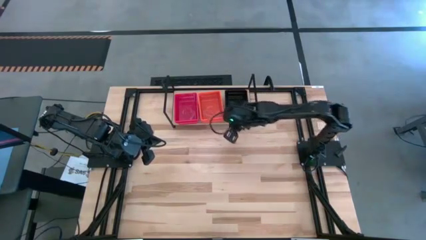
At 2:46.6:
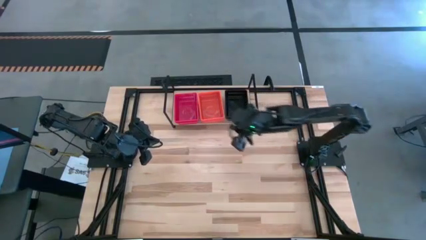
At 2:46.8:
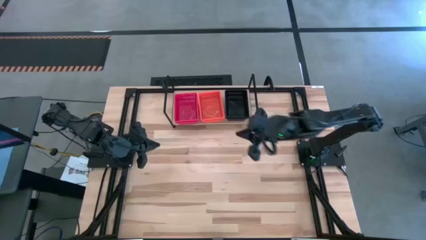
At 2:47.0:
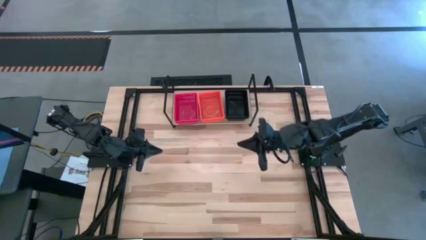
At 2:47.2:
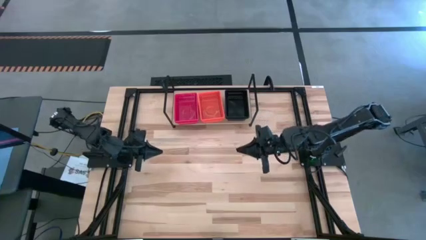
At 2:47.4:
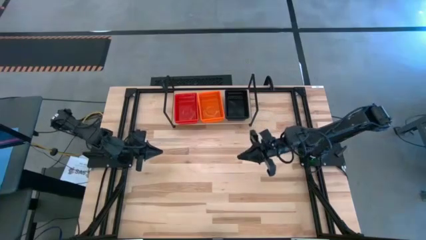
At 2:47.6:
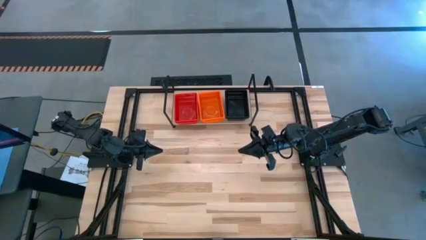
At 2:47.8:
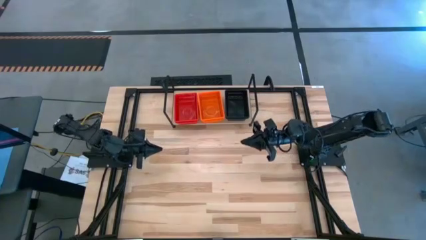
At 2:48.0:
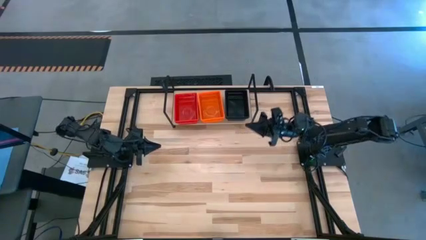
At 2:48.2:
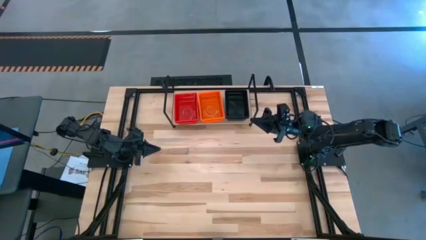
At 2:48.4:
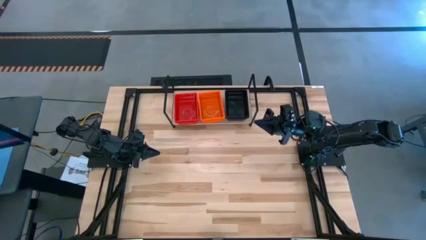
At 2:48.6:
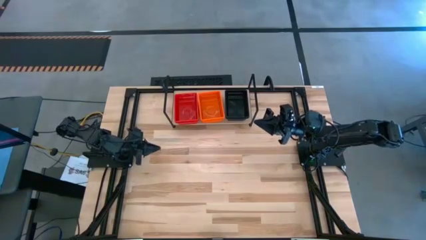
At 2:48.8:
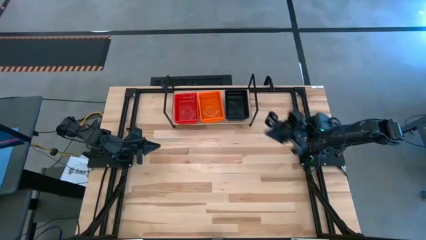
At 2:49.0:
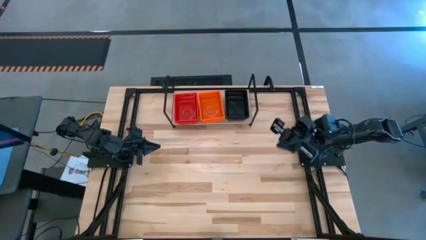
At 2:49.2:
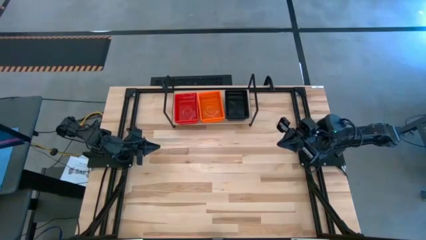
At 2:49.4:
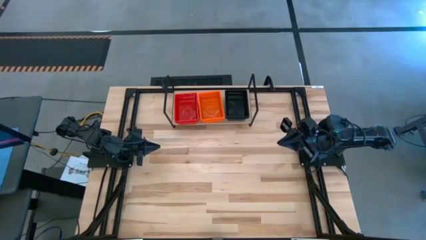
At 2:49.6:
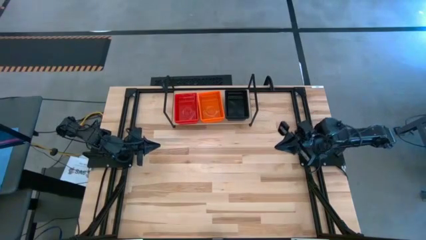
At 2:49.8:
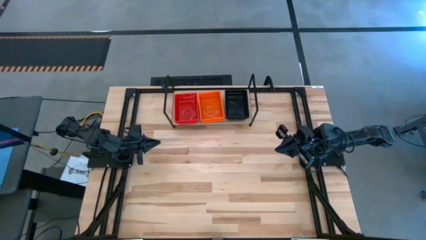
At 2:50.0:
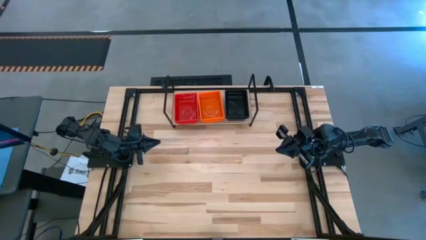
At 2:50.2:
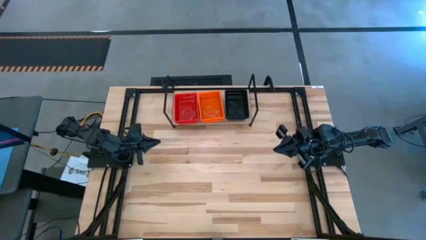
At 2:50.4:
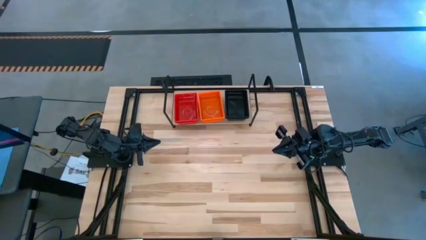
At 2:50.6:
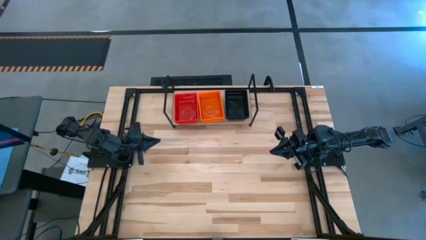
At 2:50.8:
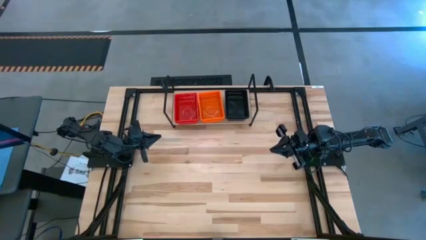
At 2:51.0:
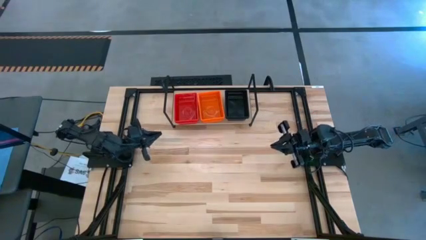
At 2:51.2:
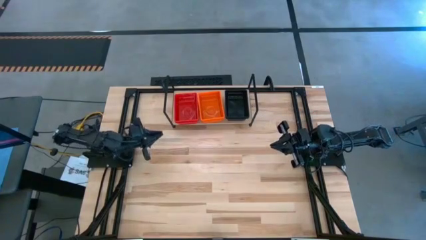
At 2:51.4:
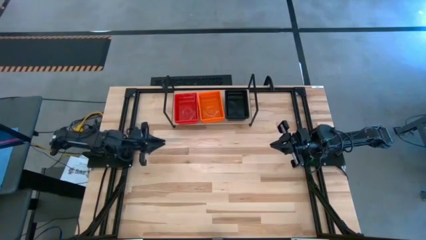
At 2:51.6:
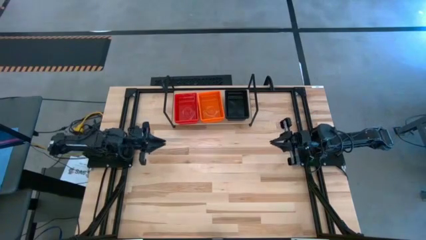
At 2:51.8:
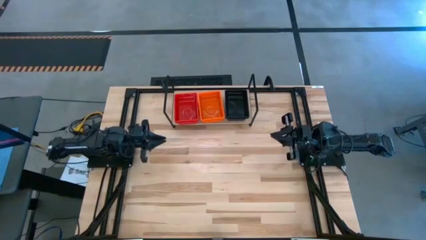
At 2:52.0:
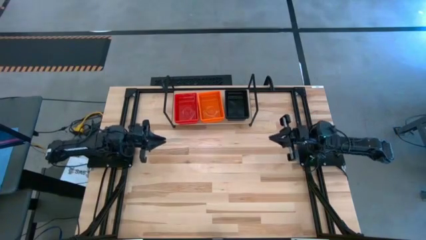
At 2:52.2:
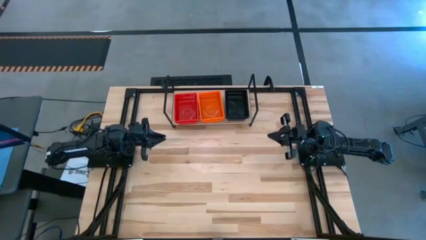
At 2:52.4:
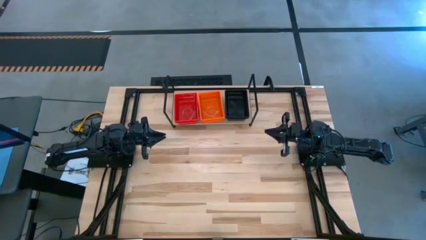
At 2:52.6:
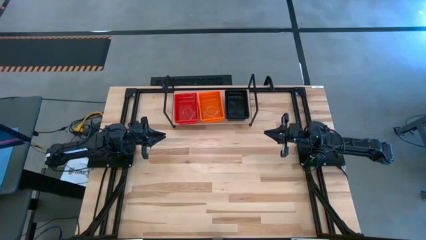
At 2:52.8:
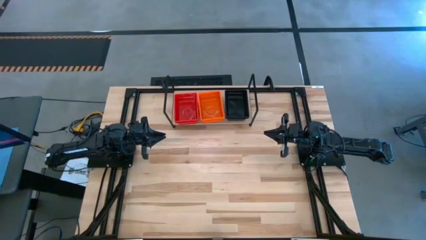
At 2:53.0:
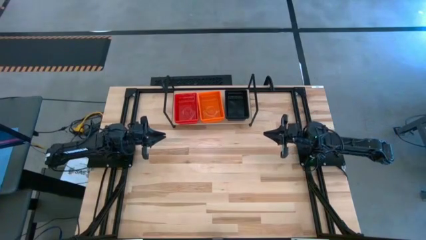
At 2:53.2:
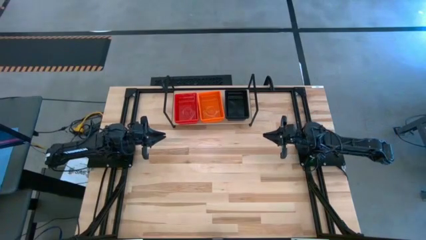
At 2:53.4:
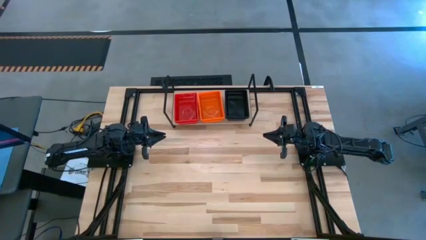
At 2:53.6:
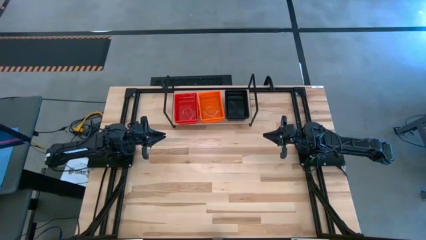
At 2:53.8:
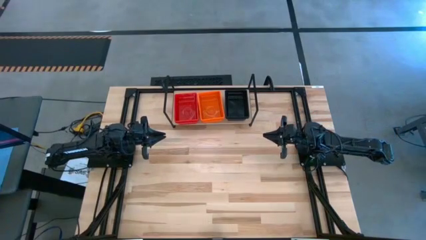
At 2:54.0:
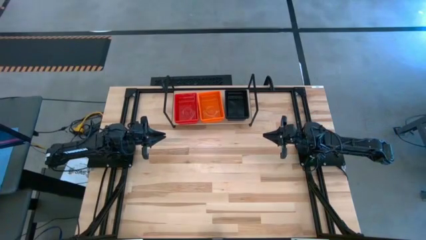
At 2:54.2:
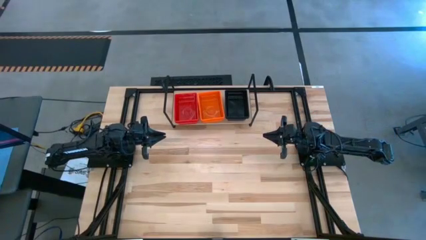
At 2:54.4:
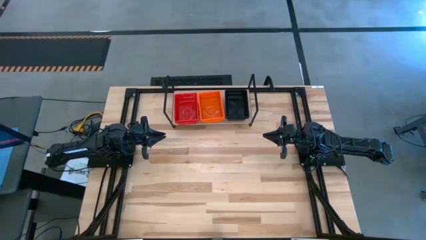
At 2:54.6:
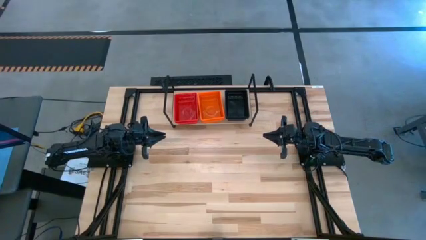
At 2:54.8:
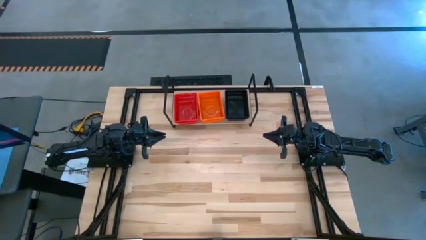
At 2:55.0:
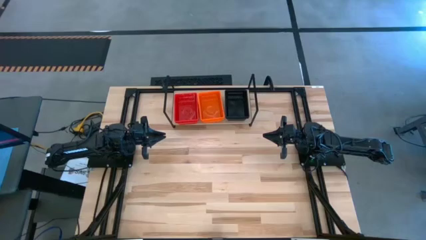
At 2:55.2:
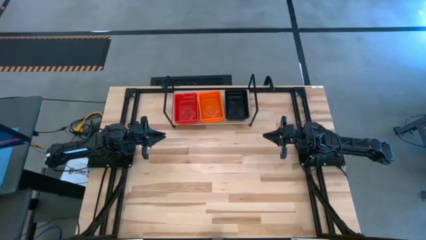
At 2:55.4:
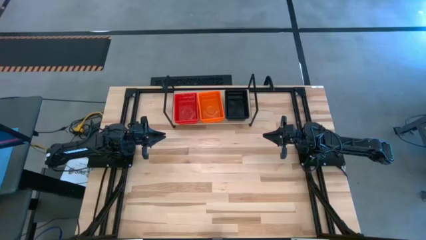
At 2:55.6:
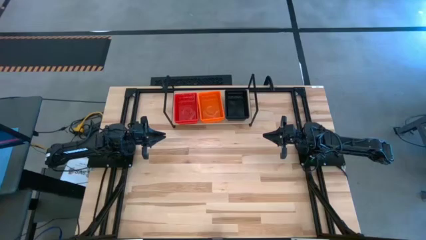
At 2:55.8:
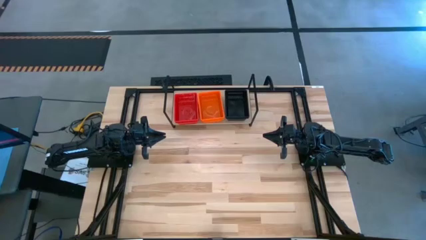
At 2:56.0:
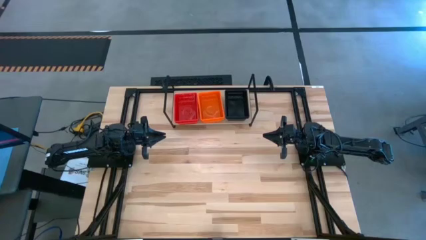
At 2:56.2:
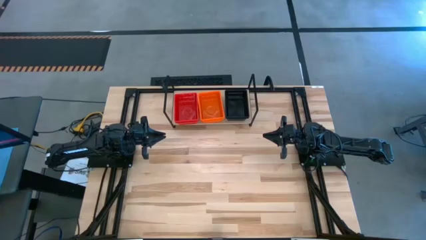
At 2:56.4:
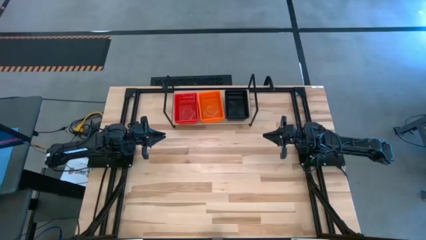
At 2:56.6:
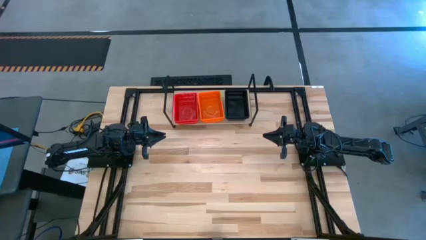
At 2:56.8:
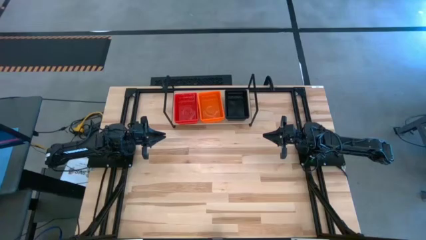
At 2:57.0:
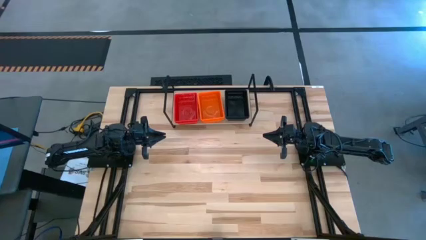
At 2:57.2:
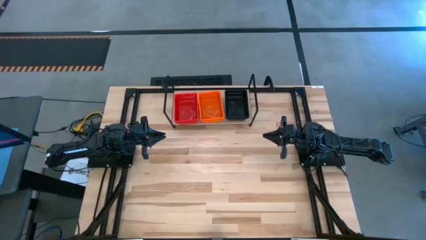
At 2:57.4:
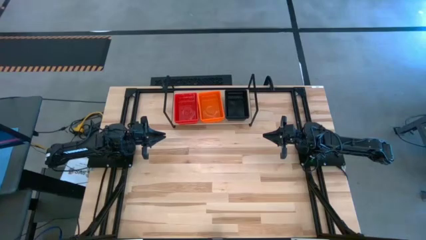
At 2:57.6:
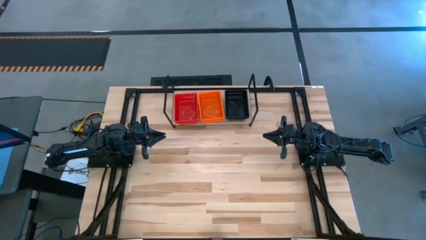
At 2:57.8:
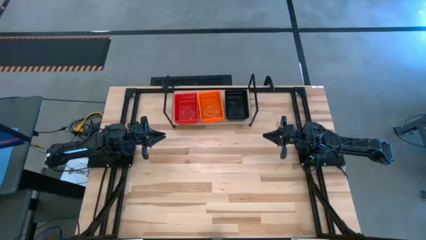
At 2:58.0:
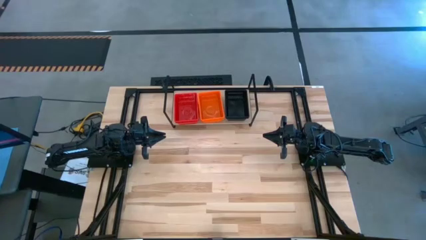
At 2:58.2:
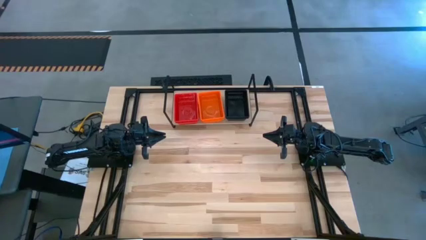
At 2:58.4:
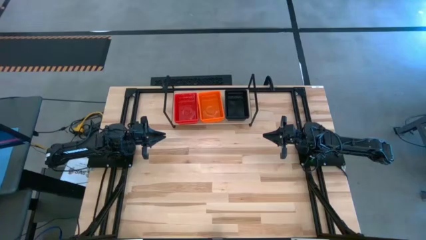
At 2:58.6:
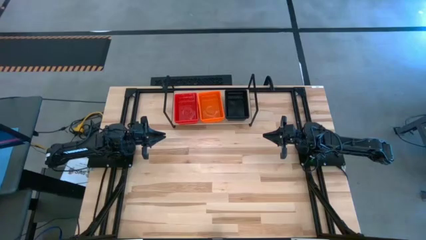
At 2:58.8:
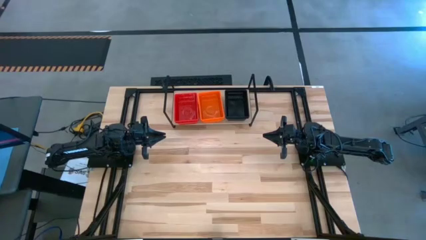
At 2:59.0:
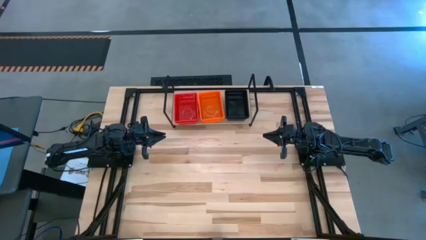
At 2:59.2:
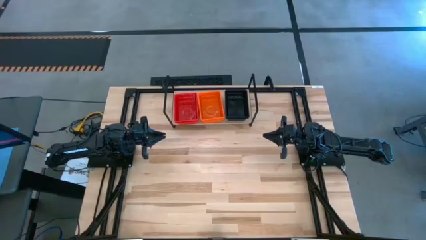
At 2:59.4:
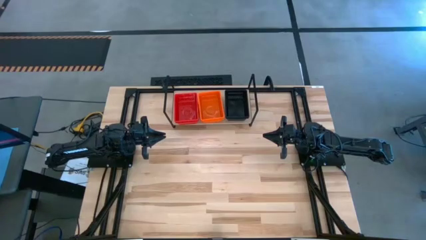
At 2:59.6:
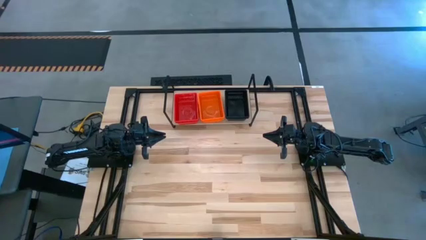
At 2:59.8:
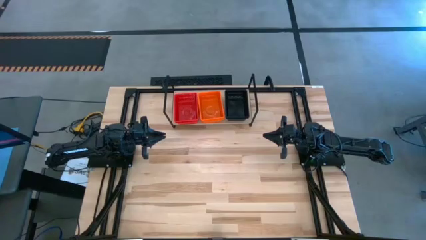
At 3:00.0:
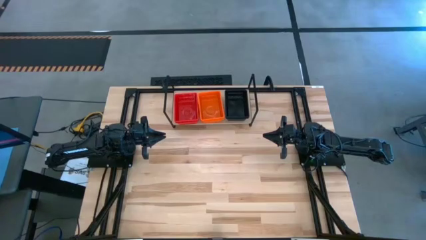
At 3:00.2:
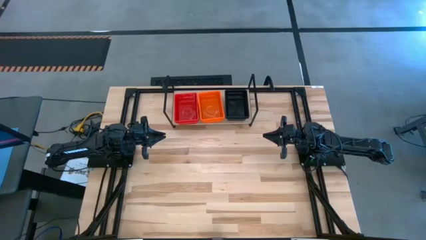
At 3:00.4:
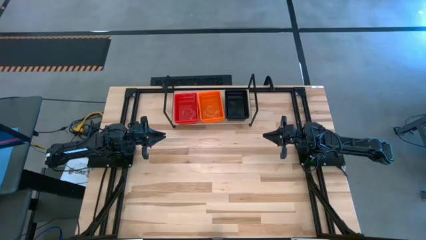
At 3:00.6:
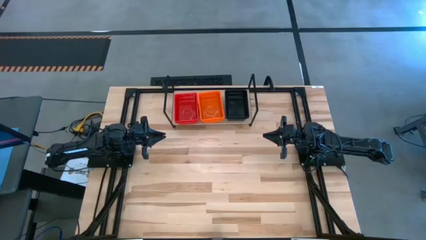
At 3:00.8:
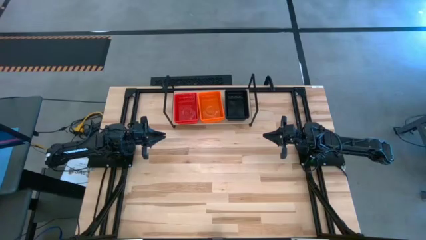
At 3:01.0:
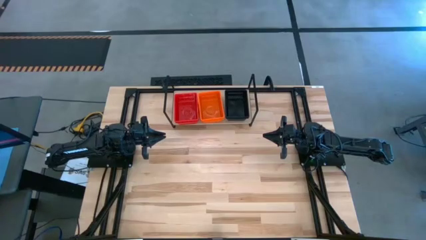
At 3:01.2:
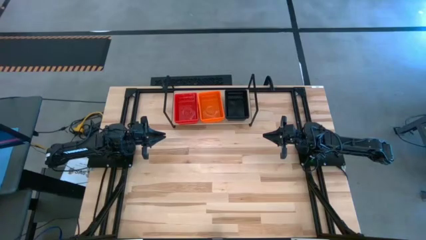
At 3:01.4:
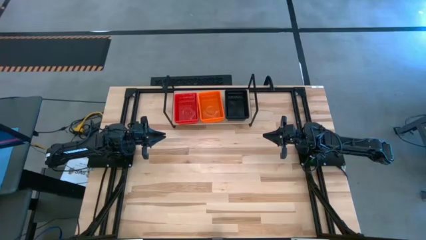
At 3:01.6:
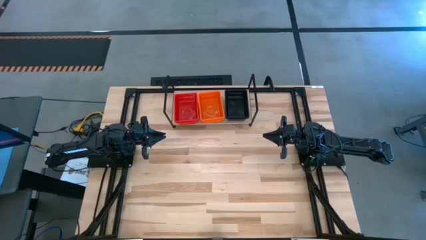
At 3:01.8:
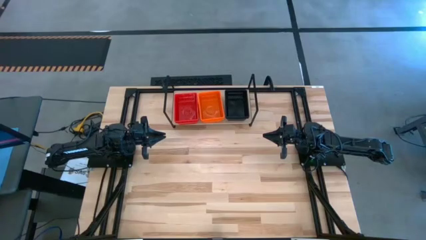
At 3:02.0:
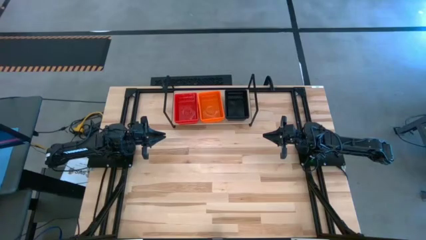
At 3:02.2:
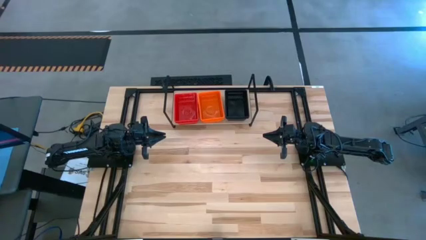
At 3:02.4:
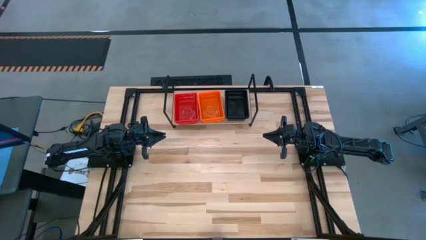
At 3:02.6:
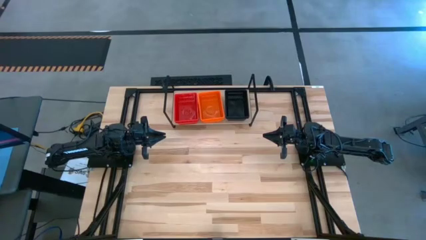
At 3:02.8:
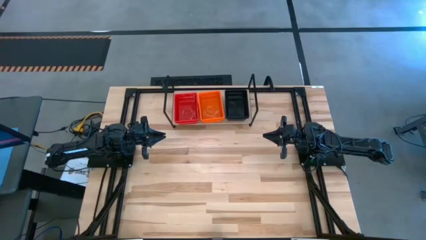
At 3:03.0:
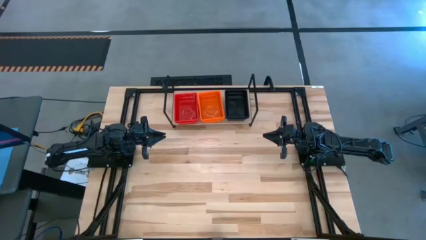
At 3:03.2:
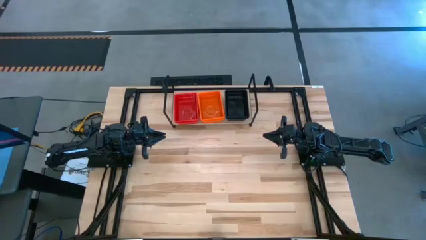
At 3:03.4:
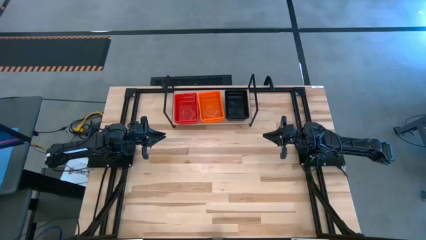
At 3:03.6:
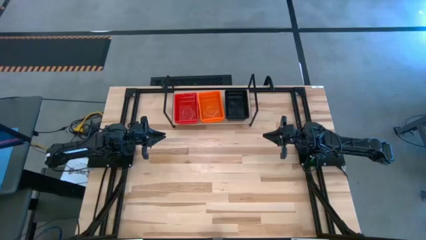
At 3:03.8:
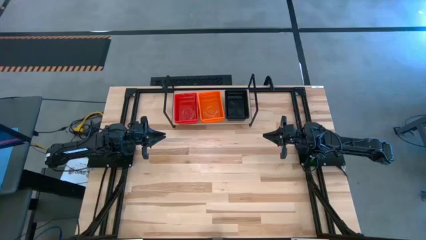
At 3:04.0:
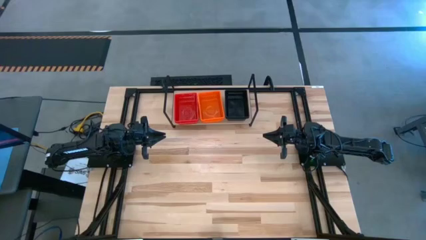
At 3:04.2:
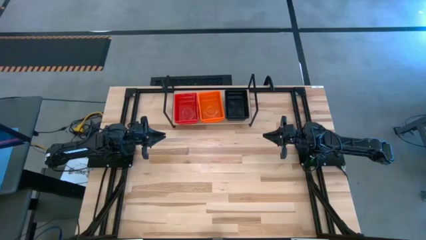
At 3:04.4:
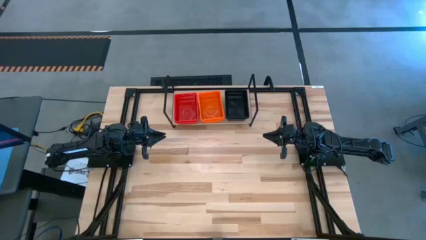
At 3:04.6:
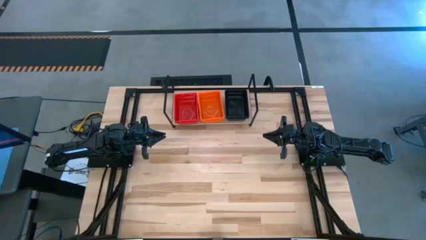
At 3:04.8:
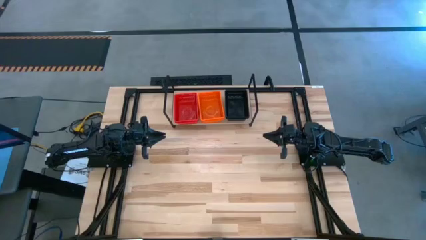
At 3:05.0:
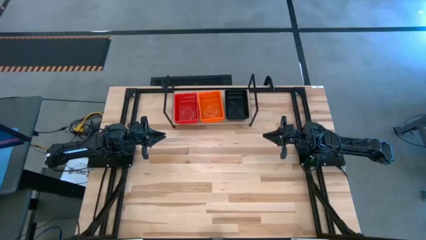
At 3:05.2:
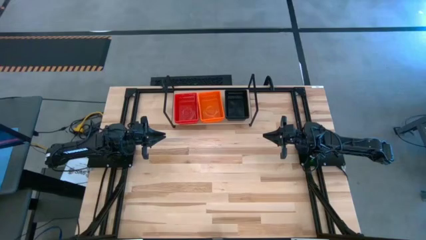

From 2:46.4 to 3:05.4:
Task: Stack baskets on shelf by color
Return to Home Position
